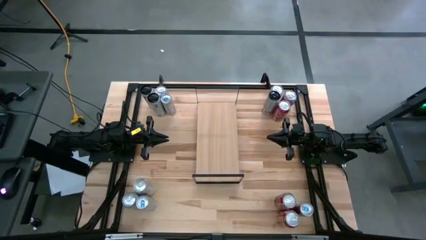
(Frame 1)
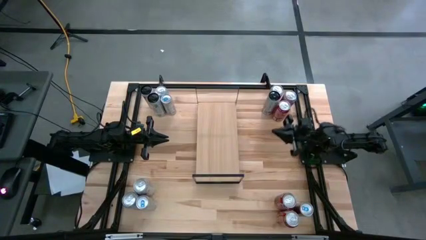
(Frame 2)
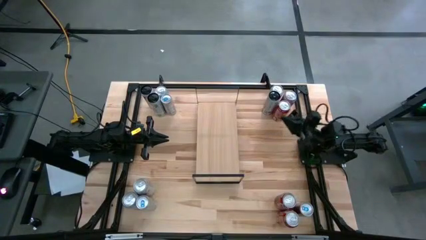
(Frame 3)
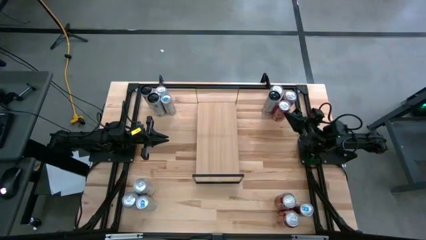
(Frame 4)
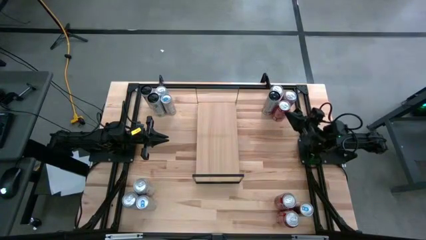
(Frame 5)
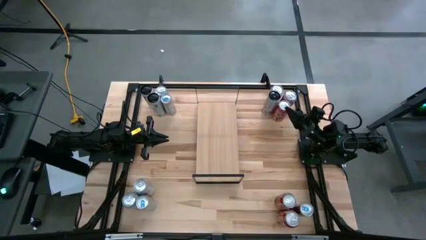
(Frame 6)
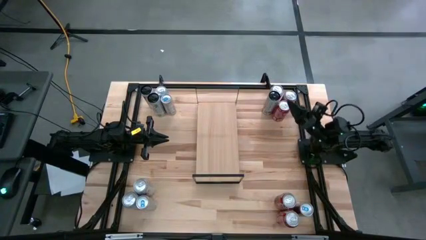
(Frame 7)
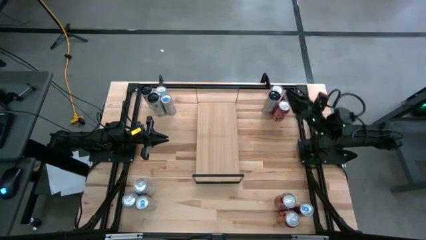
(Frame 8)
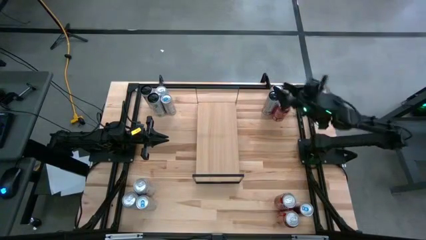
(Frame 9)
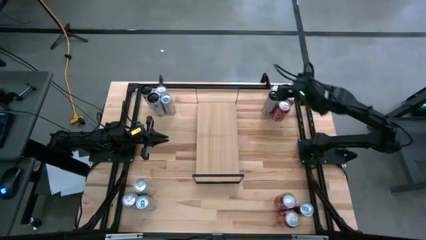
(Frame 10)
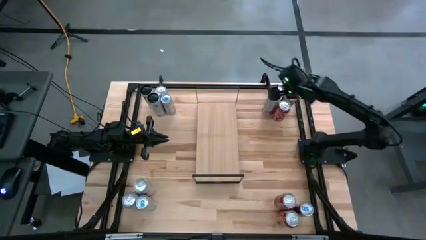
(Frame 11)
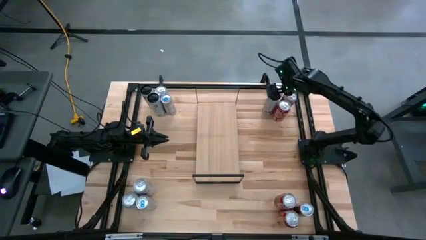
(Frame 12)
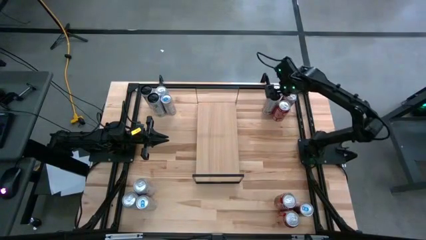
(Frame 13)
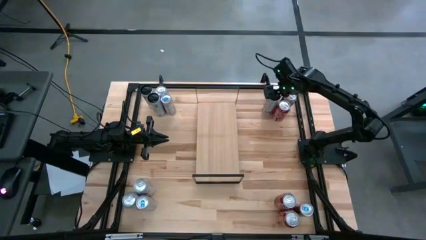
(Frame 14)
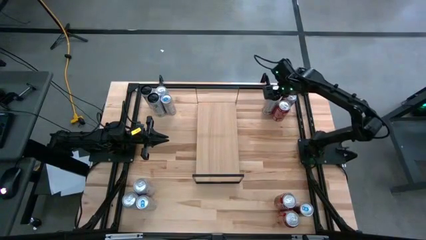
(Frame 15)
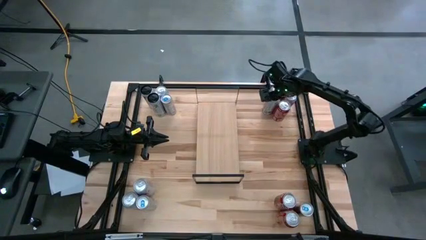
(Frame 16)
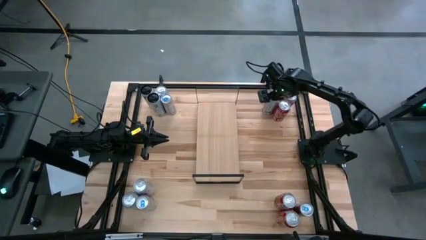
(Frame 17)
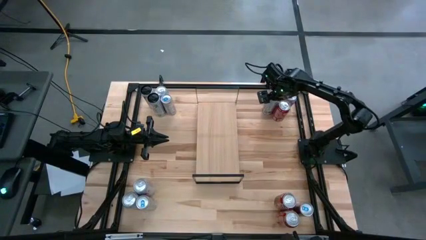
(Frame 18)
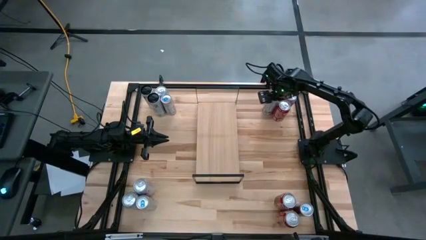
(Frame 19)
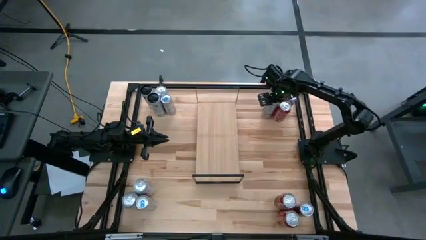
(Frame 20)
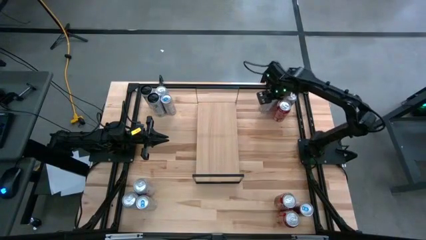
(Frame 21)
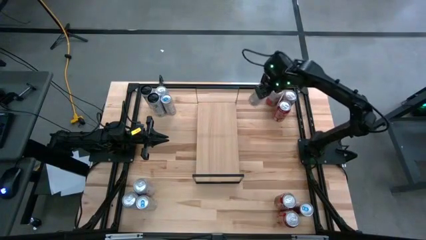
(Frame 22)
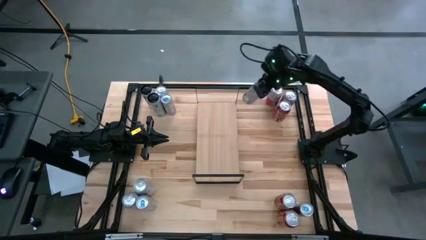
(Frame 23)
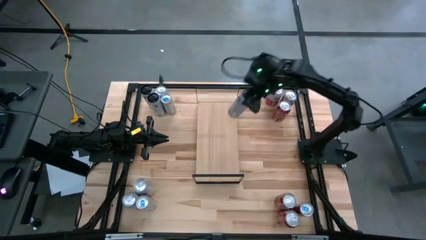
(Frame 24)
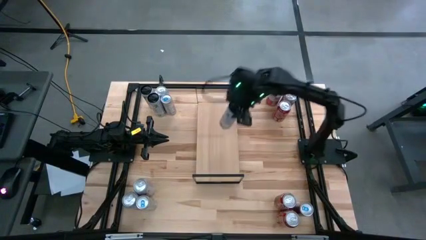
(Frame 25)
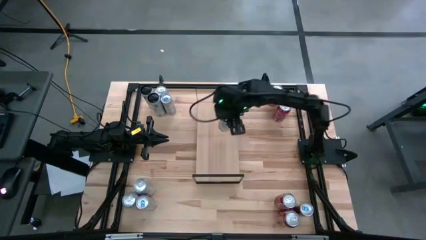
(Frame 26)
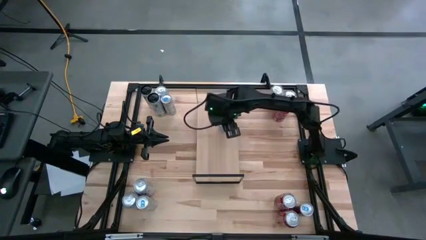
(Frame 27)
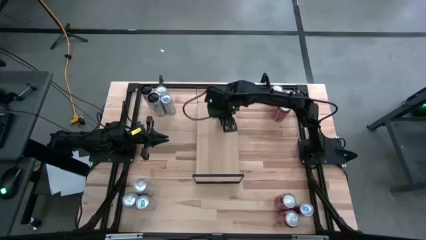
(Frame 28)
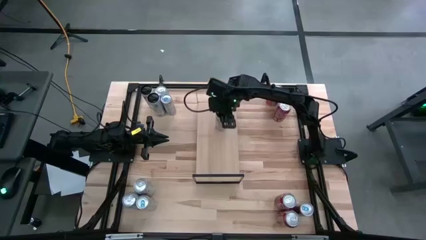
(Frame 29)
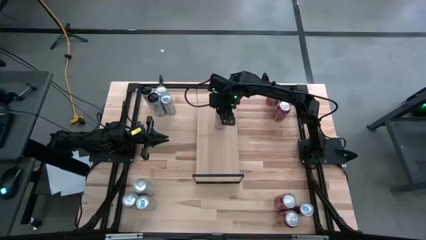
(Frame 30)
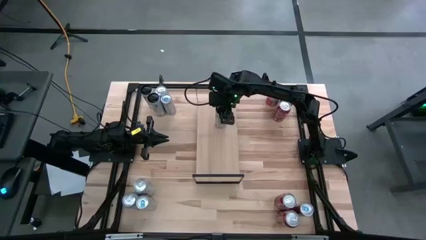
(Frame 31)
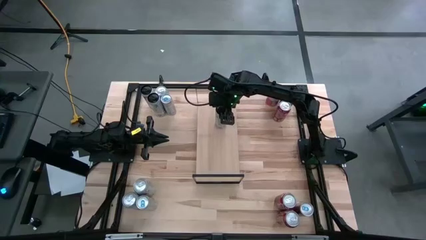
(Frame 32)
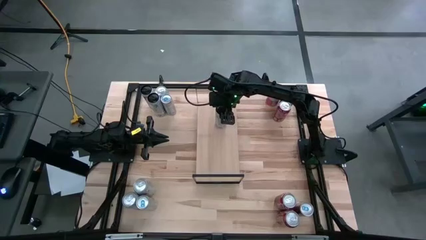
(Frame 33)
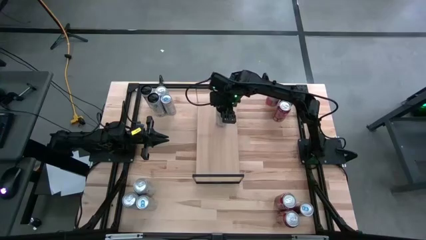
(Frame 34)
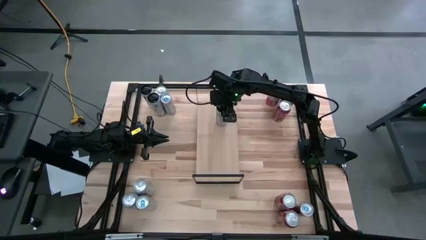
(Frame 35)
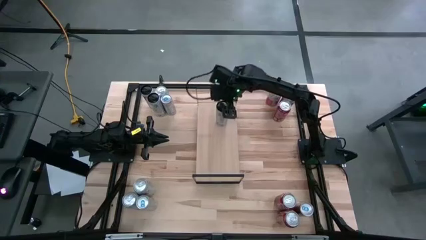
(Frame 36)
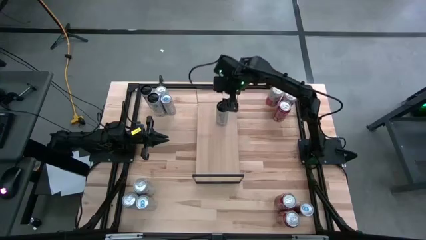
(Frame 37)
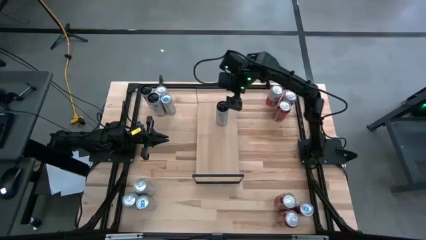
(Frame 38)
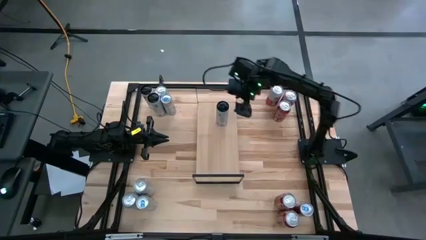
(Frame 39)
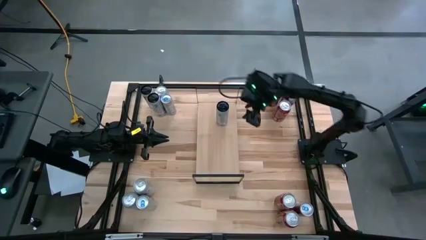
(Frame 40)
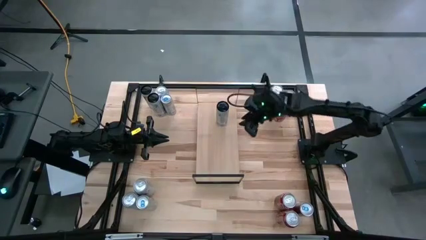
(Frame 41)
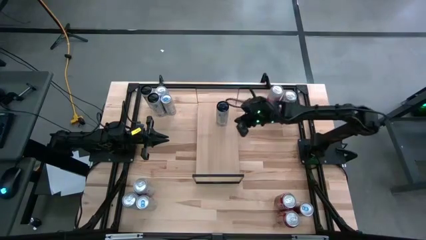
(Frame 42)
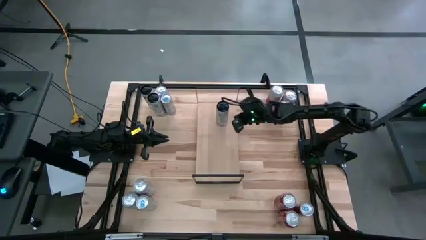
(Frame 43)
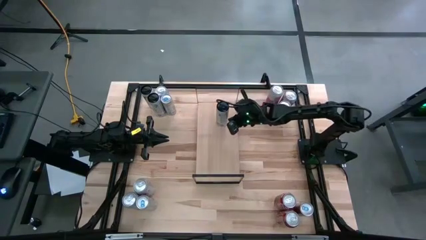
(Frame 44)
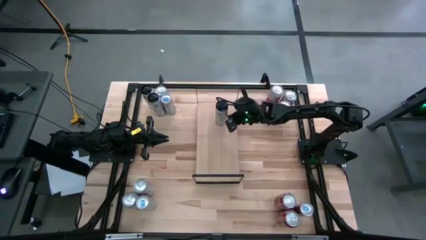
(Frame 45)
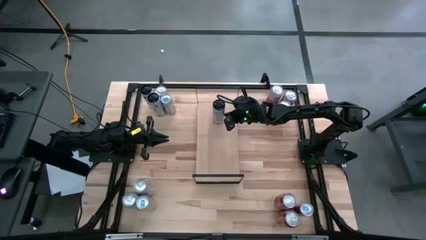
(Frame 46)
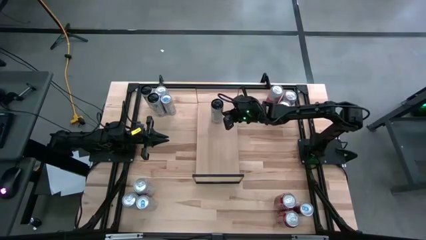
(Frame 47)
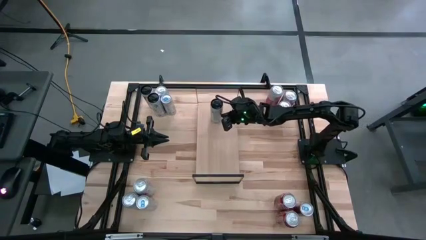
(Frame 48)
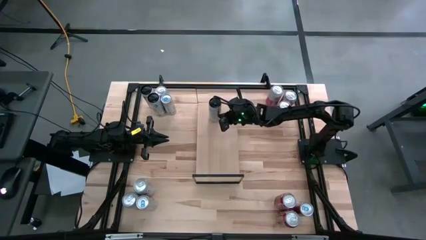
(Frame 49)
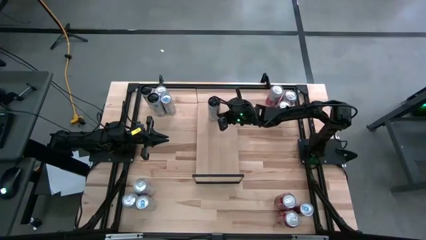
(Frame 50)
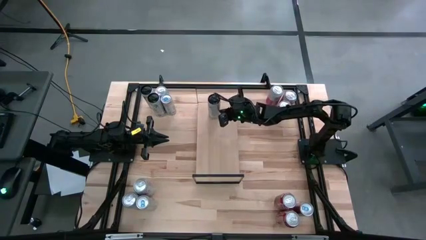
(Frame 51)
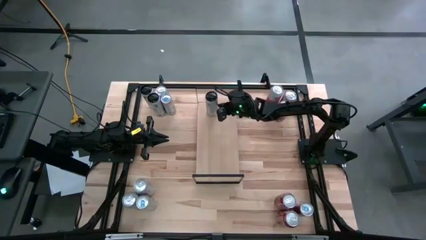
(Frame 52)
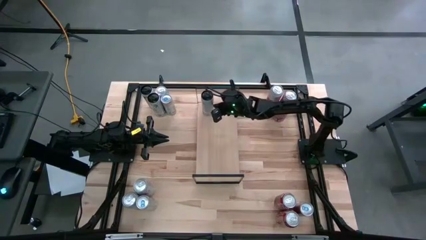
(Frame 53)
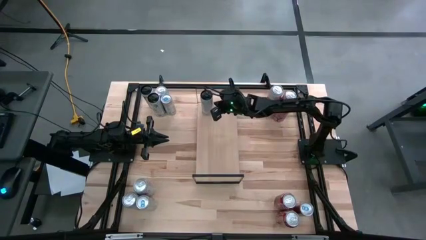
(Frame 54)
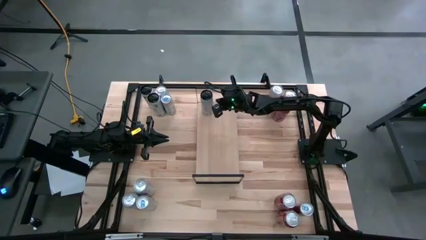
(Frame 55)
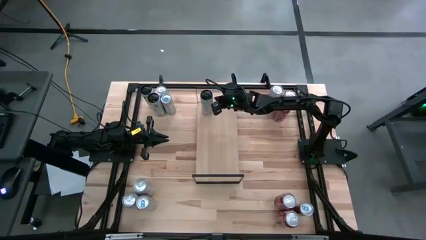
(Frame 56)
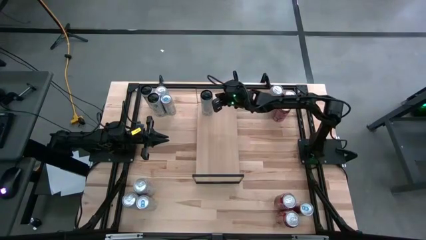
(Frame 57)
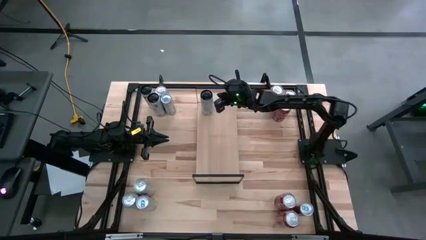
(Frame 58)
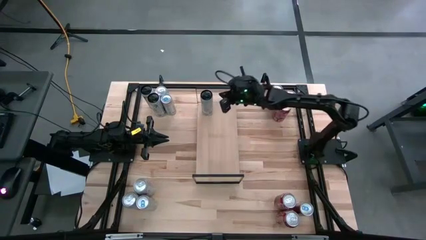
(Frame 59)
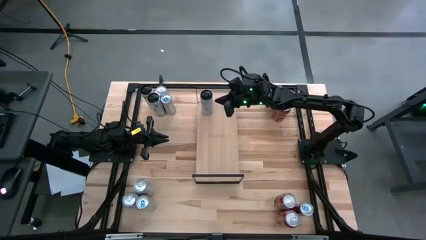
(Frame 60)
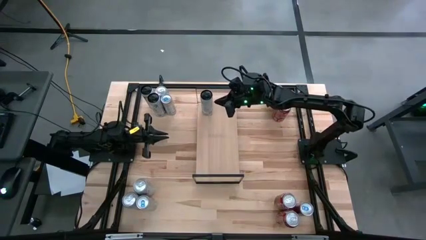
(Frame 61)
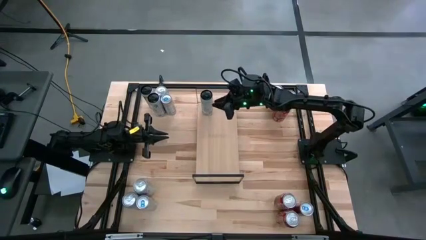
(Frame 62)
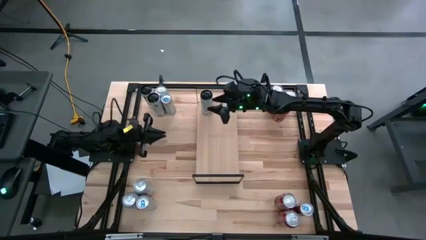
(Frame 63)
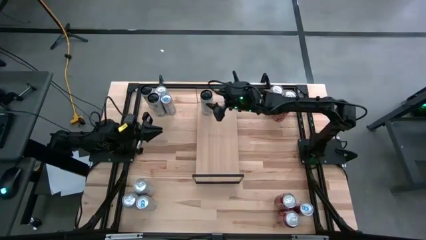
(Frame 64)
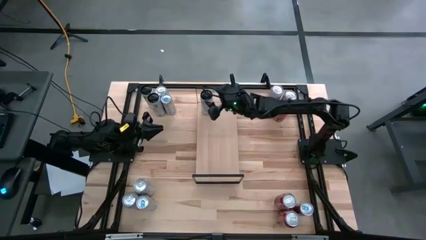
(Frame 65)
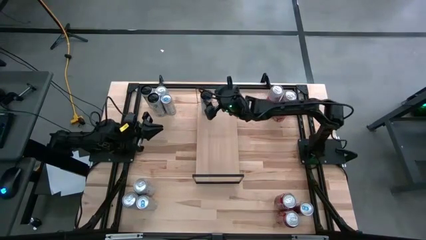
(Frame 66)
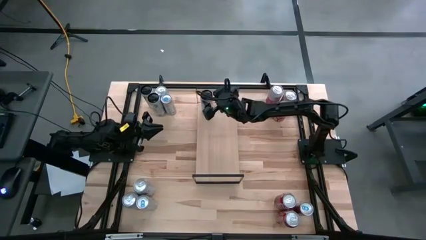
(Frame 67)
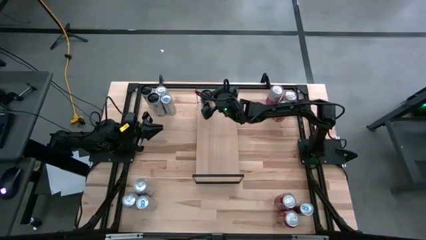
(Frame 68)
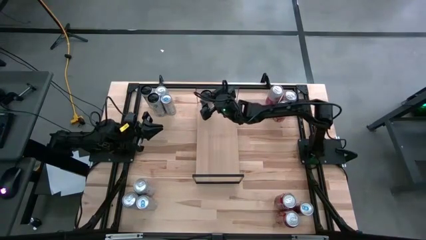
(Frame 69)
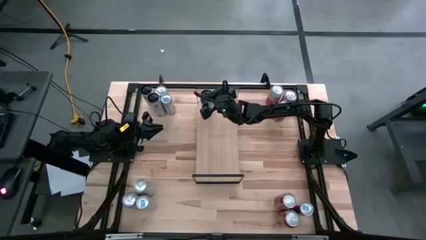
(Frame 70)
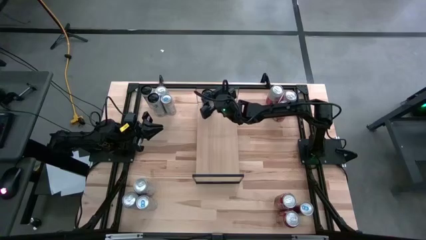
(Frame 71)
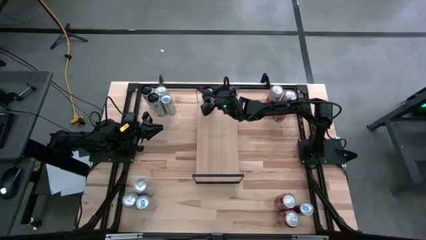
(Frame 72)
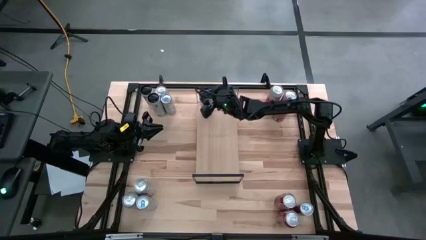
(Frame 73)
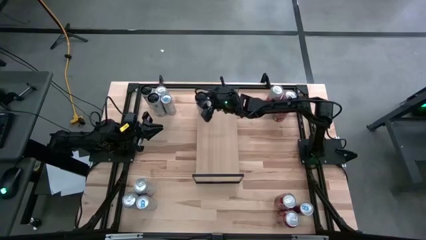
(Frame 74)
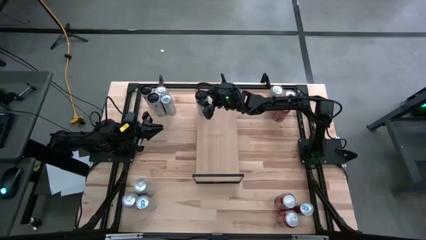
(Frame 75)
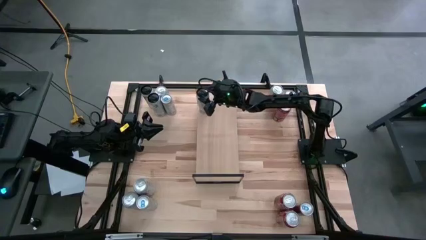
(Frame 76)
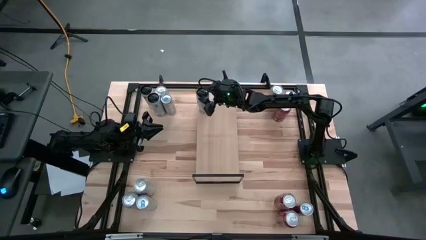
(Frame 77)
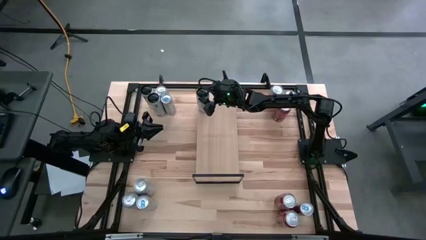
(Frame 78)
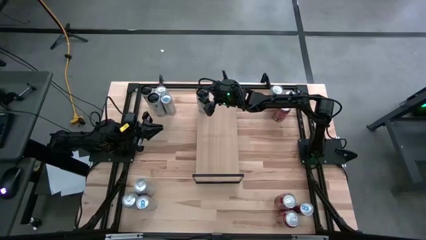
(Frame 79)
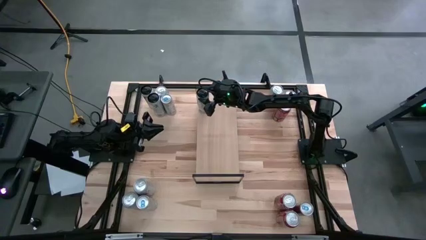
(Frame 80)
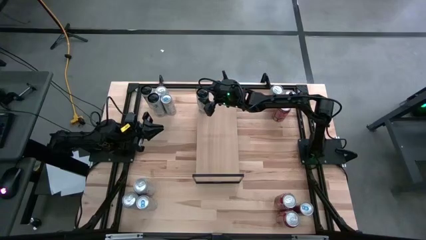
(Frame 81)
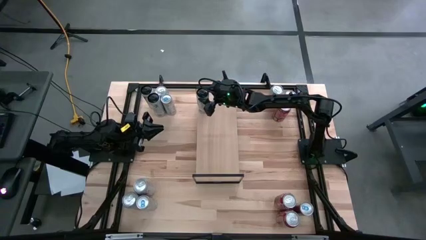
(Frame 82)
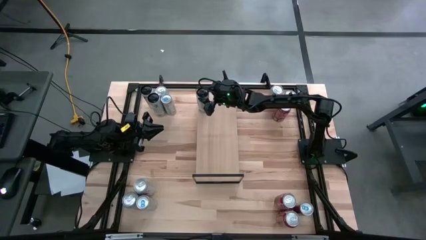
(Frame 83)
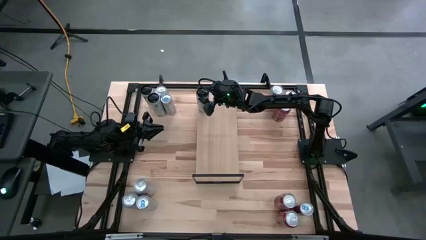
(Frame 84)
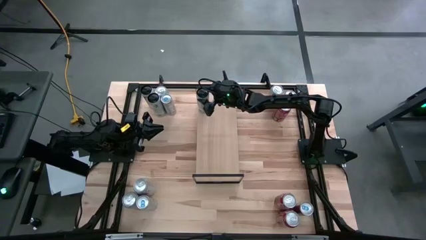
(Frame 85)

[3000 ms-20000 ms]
Task: Place canned beverage on shelf
Put the top right white-pink soda can on the shelf
